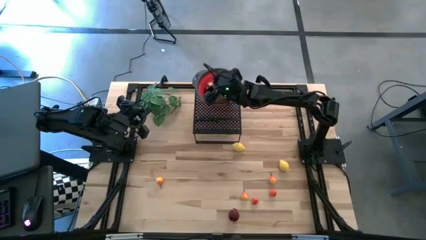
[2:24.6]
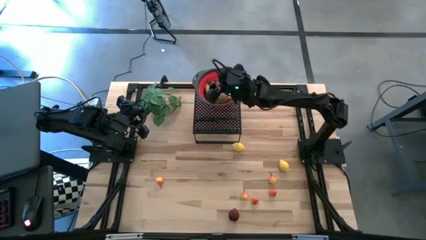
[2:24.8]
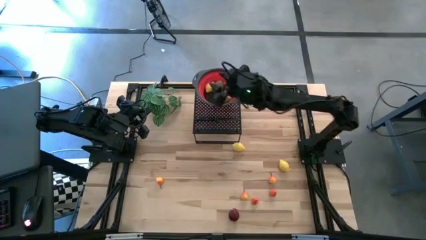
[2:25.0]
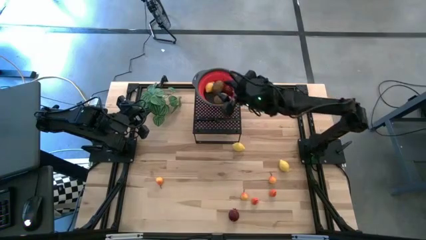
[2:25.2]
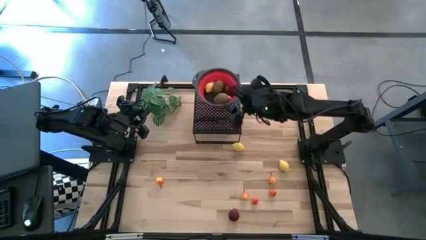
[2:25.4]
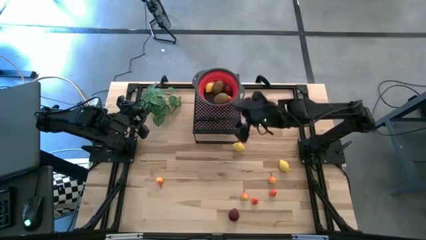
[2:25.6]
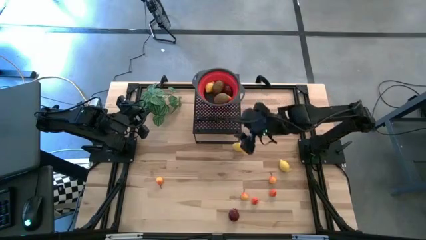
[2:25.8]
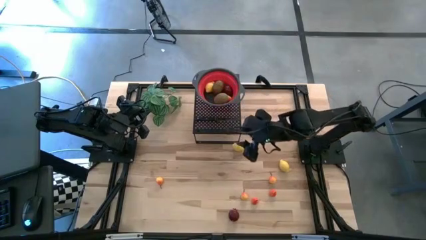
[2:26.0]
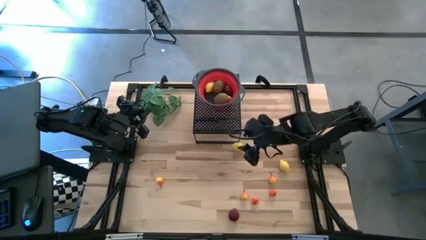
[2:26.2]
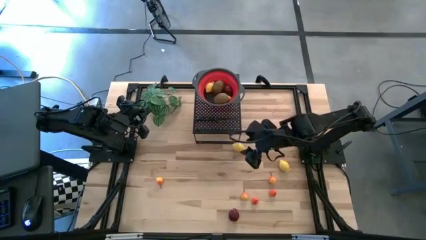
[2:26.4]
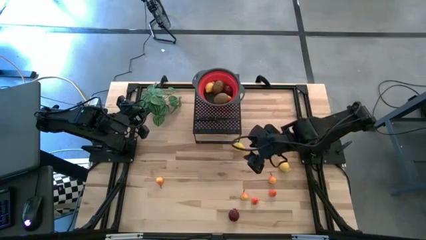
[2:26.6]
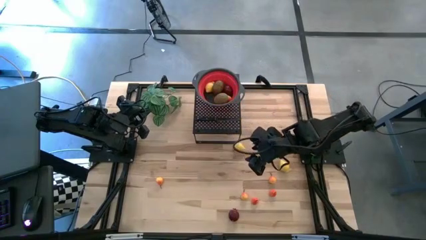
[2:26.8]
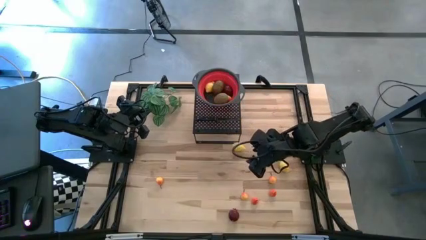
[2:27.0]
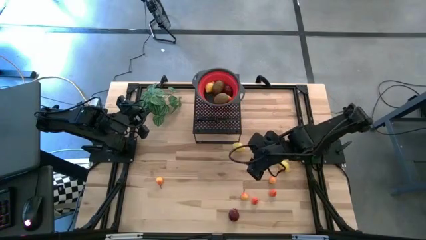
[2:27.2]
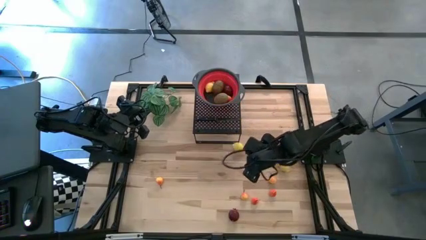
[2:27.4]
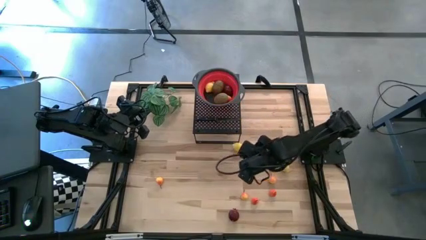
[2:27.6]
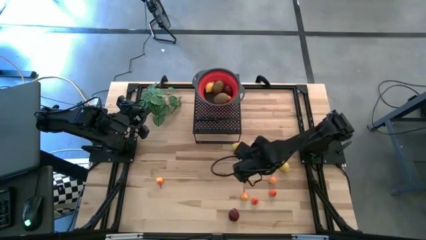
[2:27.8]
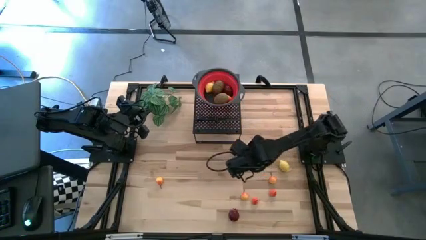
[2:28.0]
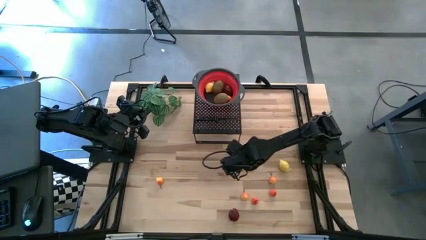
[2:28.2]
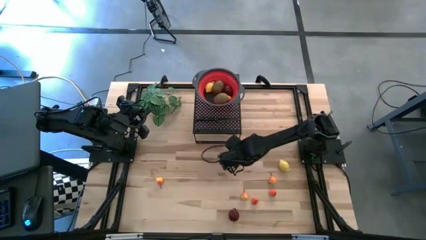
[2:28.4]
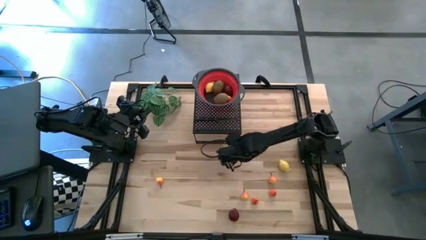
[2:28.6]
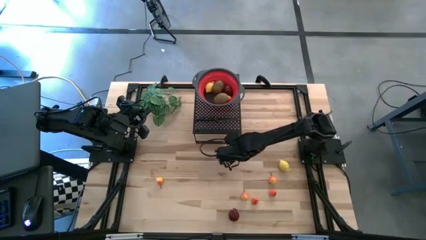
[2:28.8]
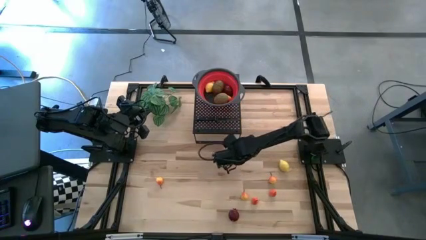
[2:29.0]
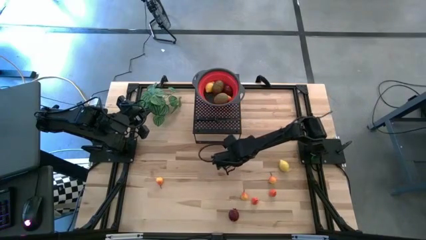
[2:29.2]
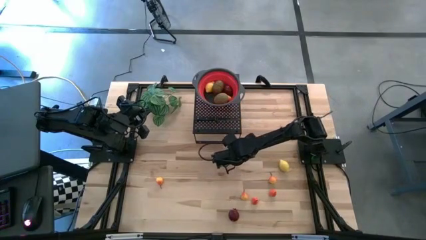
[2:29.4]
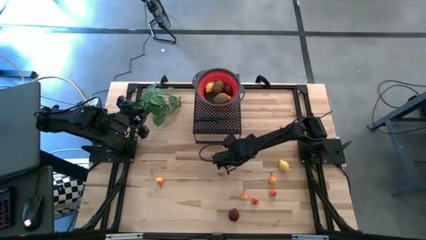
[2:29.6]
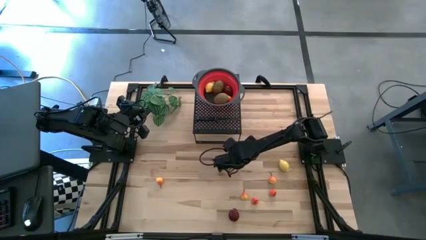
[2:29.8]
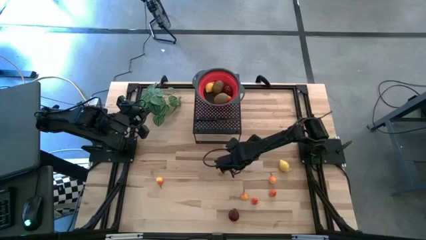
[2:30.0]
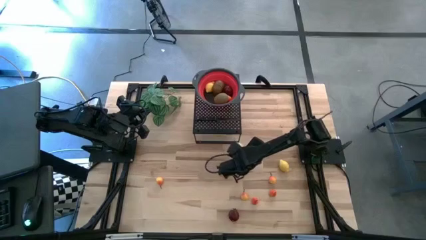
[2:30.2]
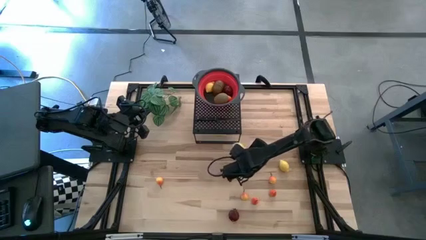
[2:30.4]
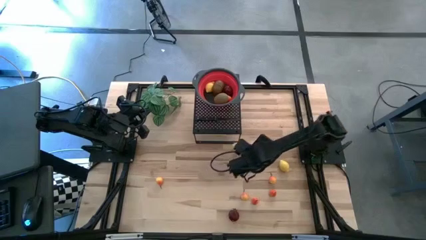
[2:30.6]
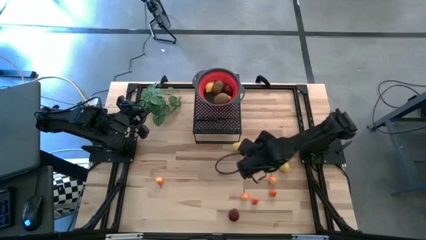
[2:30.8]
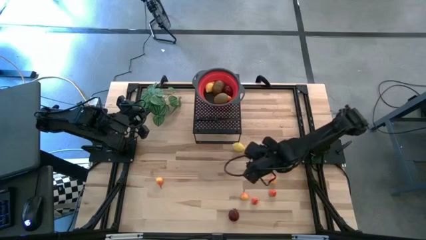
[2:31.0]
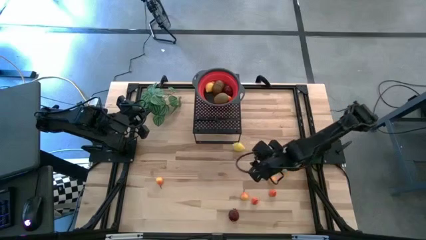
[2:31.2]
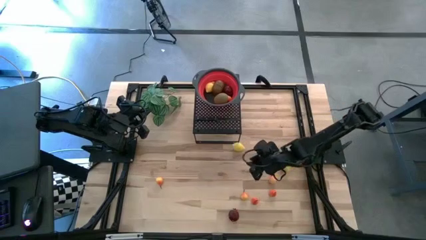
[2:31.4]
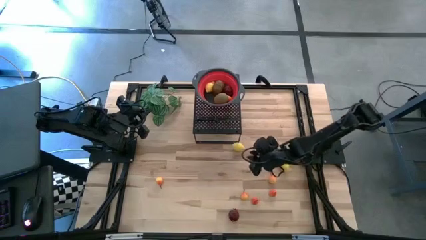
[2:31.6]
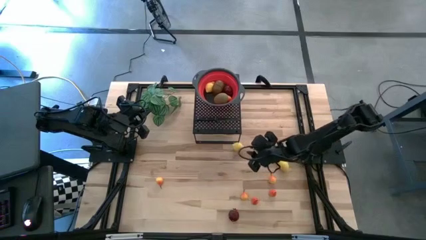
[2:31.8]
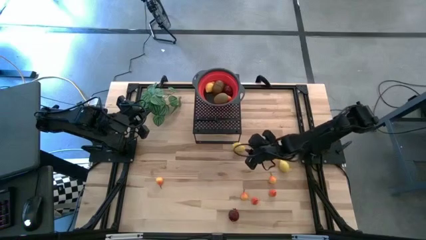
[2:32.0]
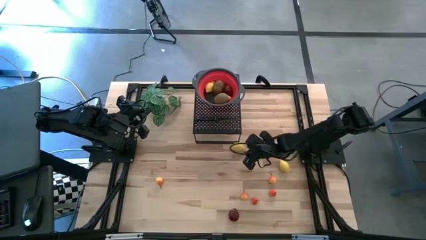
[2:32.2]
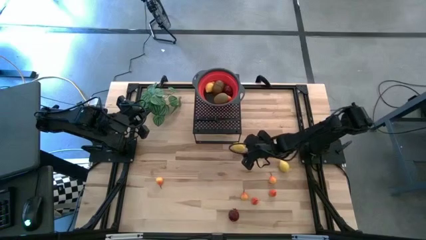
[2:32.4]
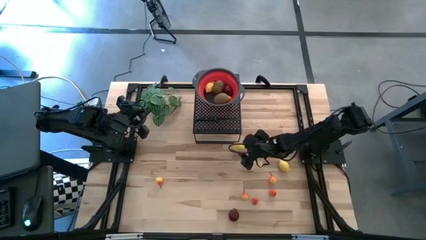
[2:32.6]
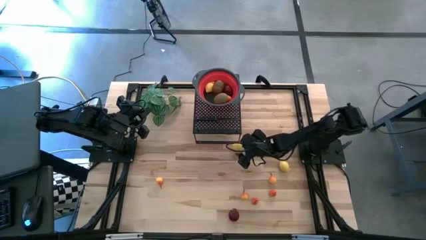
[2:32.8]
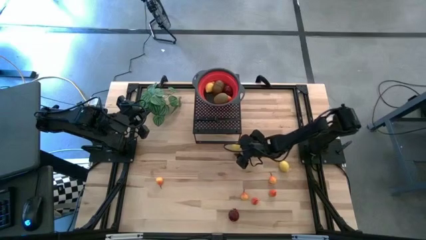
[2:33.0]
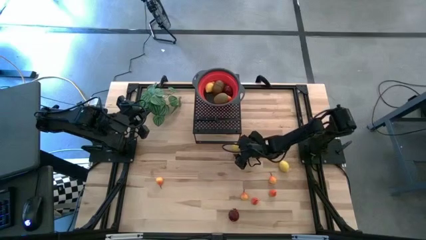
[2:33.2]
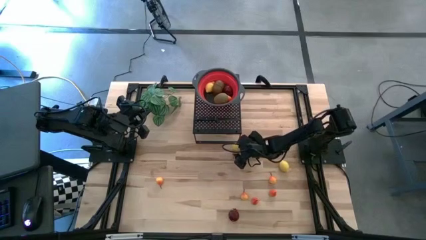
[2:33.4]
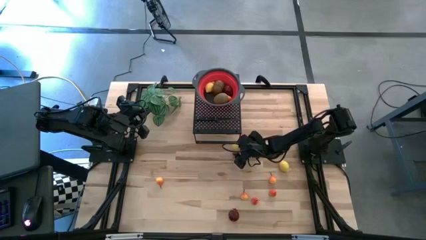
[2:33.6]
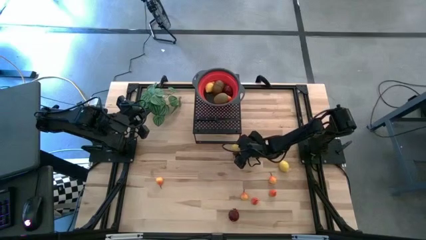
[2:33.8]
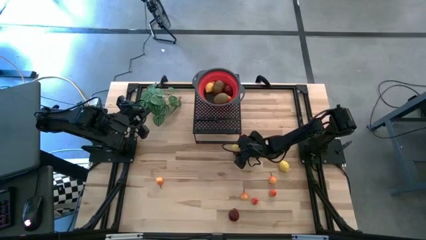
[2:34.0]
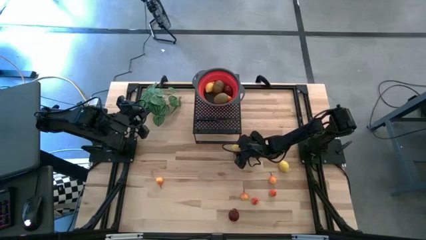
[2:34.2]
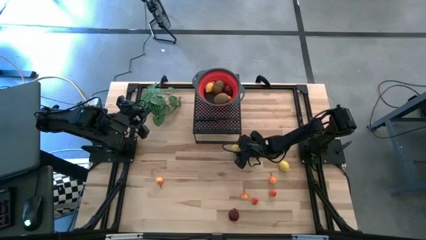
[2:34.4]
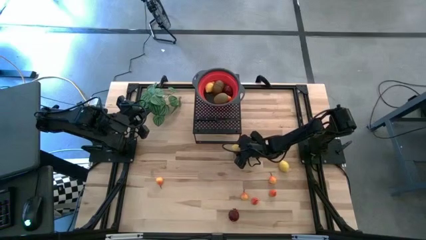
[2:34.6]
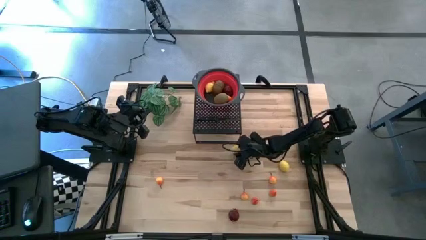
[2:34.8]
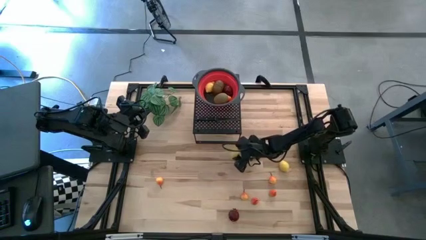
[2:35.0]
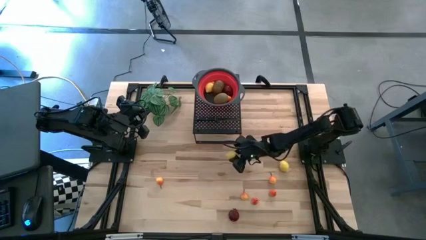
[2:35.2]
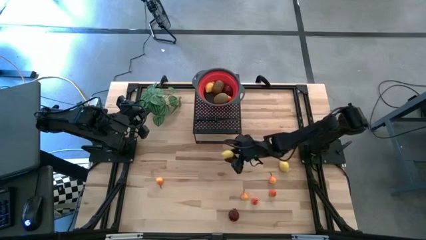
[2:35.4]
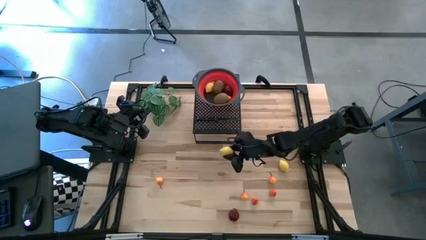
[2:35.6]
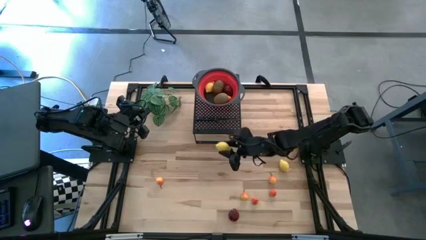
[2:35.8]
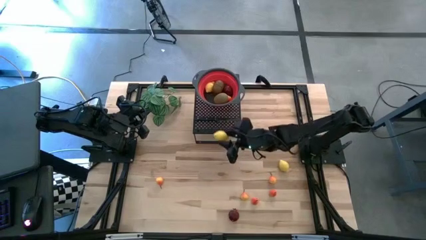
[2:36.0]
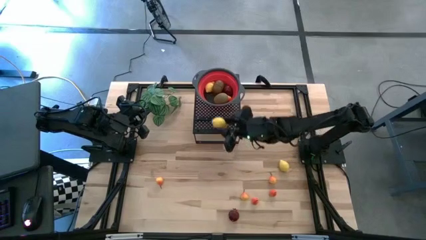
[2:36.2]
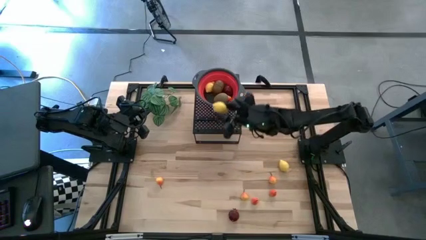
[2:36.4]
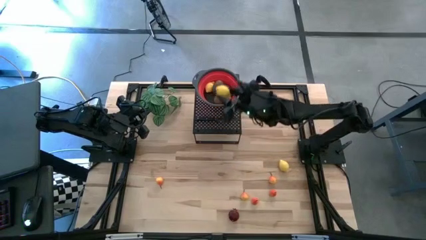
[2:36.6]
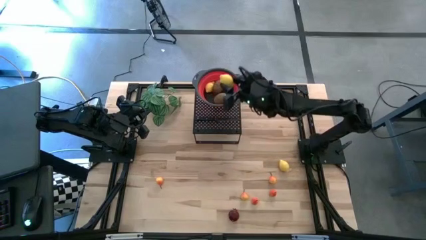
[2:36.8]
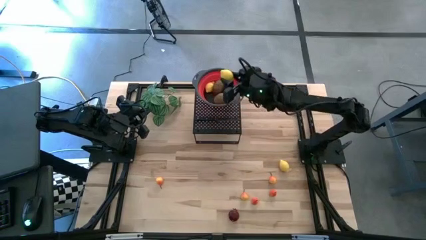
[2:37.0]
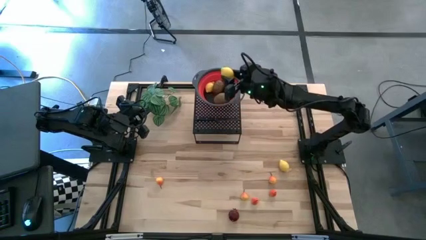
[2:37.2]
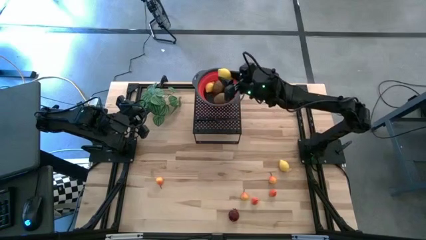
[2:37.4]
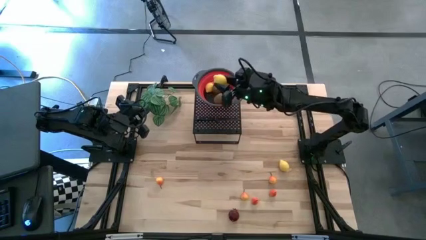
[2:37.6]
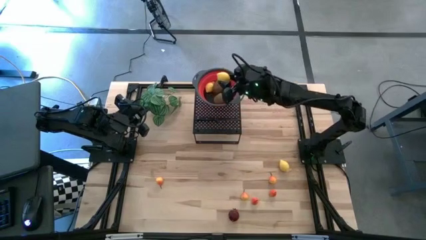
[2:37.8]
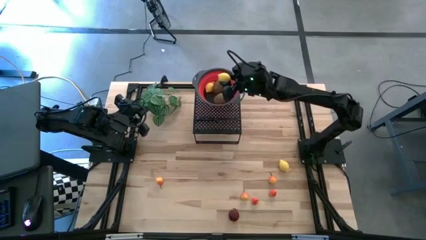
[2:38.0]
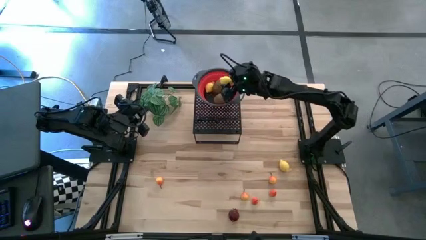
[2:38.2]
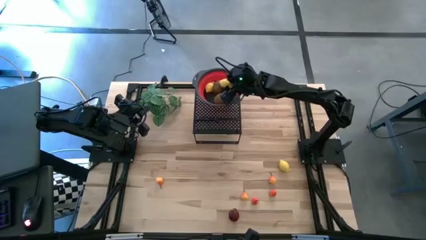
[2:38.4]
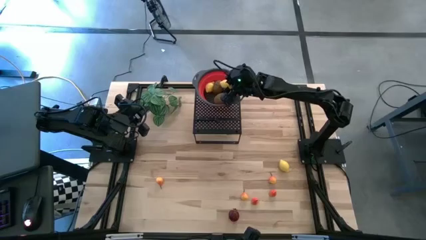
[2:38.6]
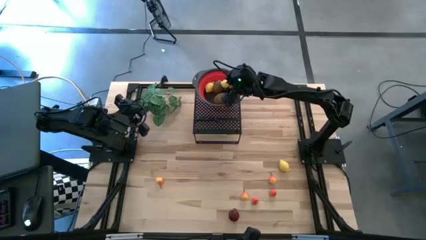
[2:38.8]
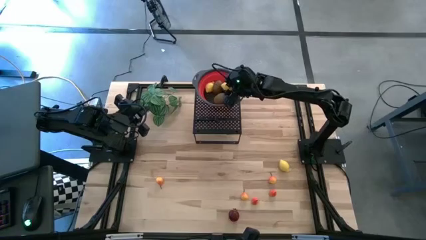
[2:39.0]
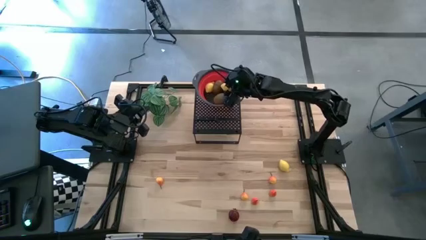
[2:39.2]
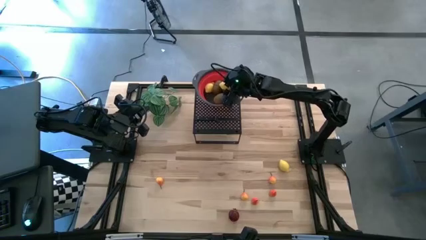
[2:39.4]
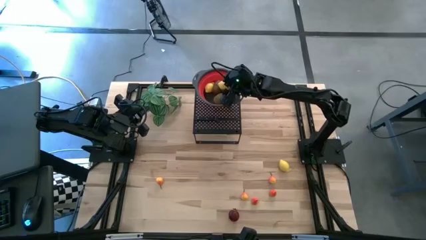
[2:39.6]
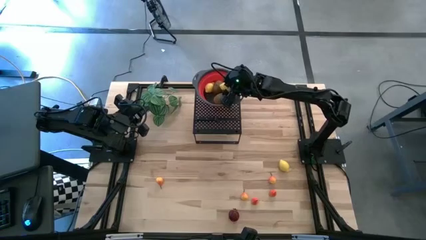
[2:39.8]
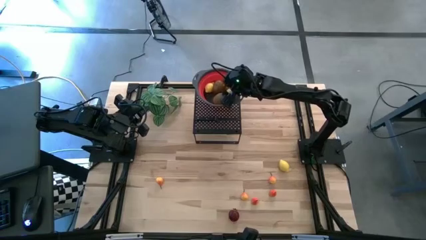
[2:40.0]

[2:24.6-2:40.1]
Task: Pick & Place Fruit
Put the left lemon into the red strainer bowl
